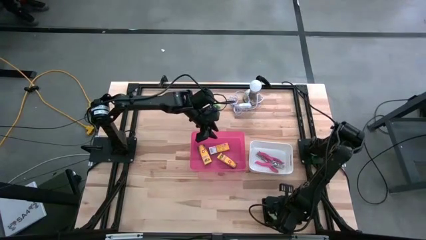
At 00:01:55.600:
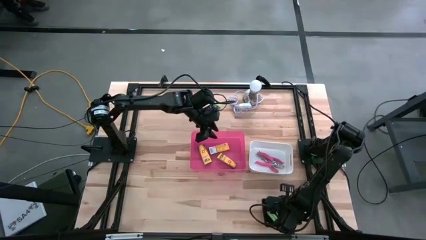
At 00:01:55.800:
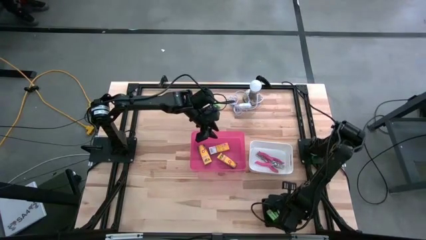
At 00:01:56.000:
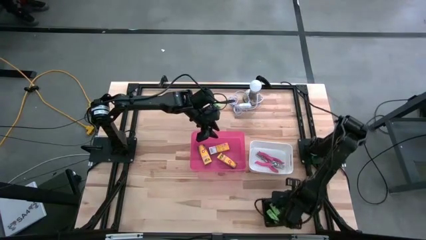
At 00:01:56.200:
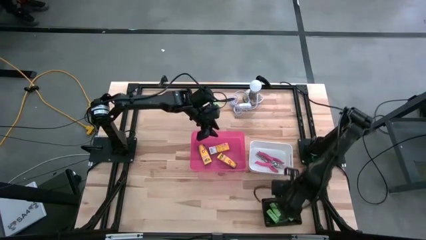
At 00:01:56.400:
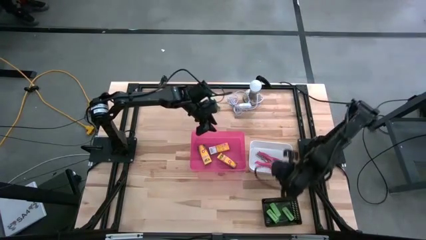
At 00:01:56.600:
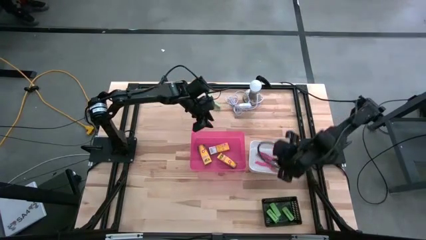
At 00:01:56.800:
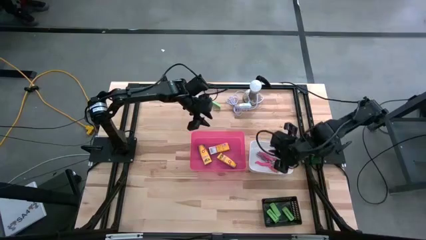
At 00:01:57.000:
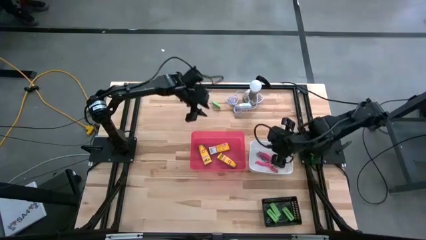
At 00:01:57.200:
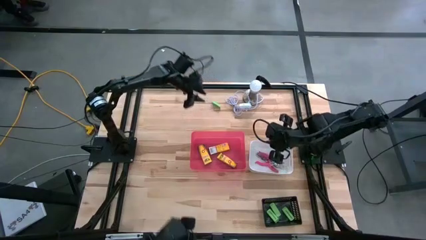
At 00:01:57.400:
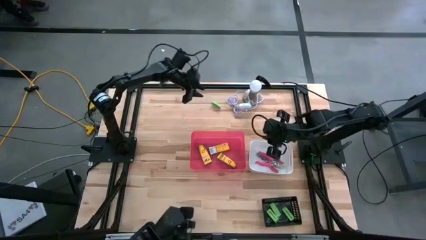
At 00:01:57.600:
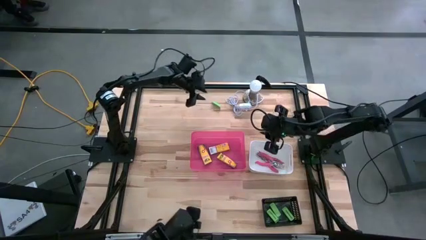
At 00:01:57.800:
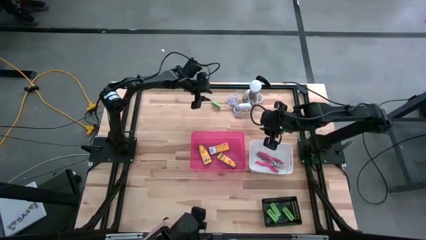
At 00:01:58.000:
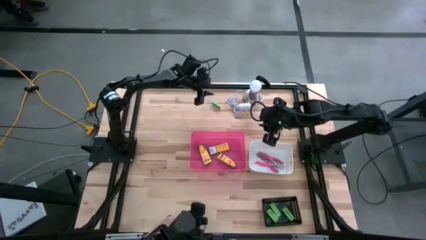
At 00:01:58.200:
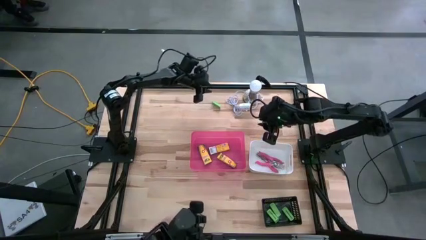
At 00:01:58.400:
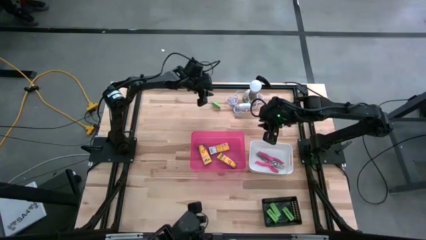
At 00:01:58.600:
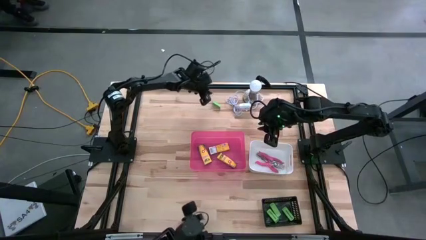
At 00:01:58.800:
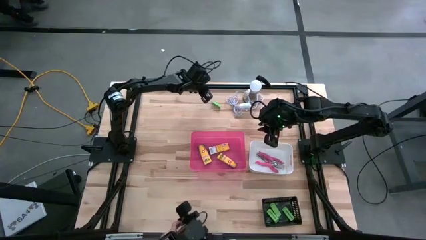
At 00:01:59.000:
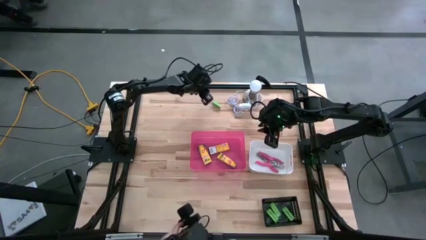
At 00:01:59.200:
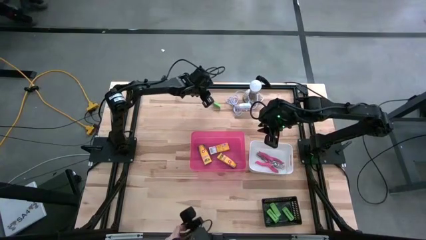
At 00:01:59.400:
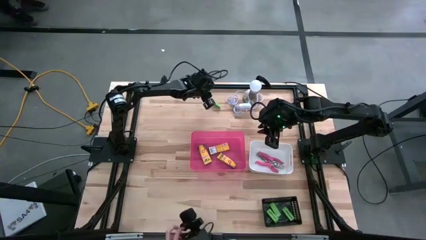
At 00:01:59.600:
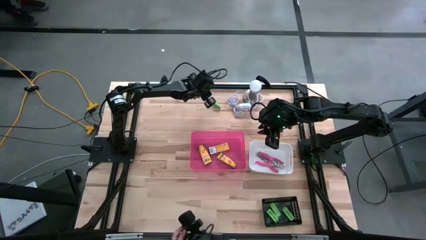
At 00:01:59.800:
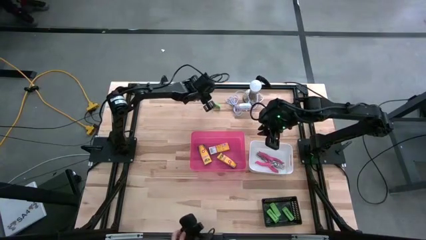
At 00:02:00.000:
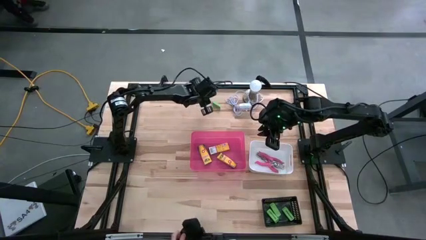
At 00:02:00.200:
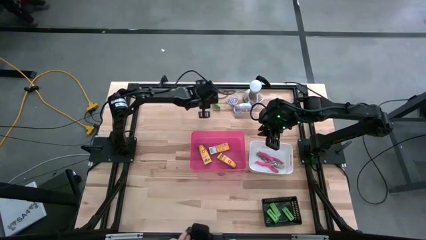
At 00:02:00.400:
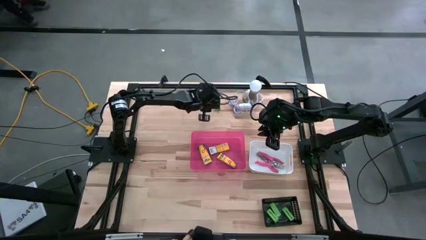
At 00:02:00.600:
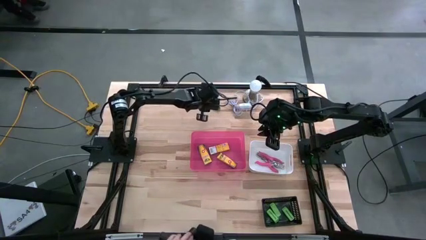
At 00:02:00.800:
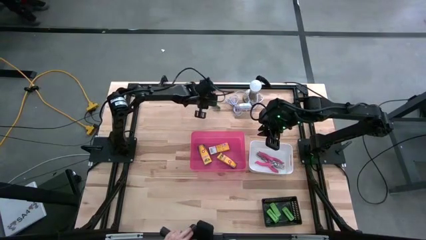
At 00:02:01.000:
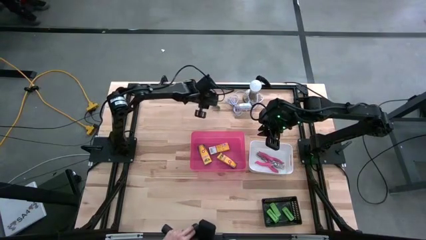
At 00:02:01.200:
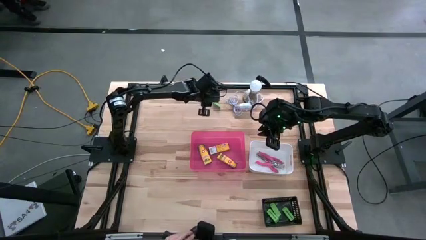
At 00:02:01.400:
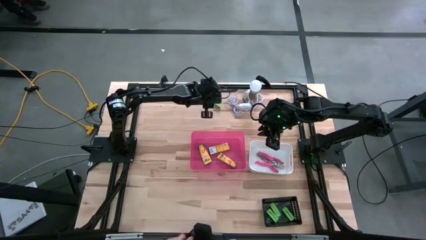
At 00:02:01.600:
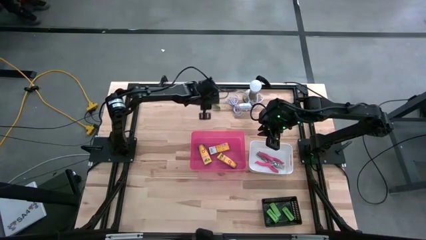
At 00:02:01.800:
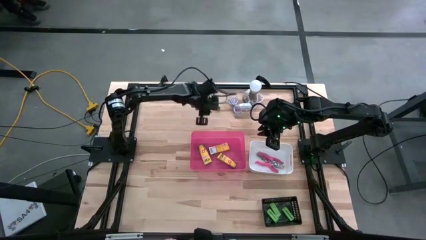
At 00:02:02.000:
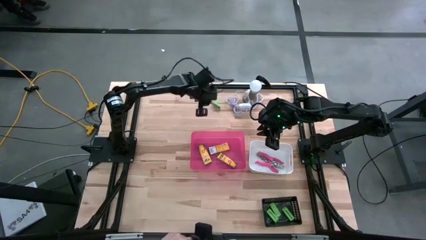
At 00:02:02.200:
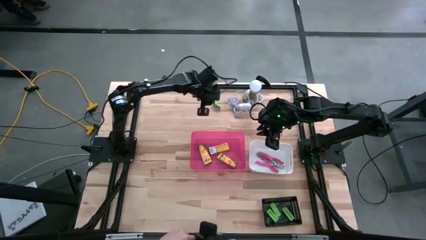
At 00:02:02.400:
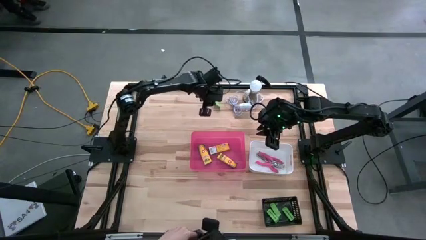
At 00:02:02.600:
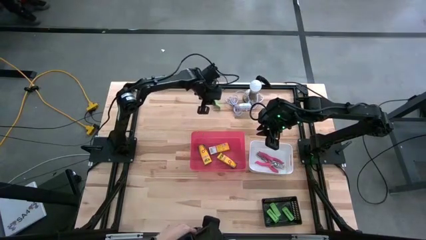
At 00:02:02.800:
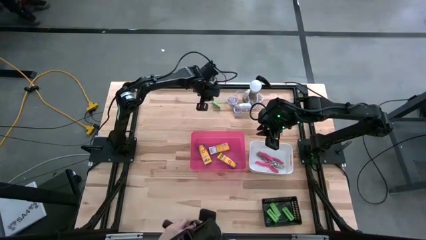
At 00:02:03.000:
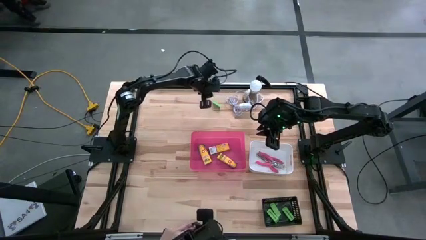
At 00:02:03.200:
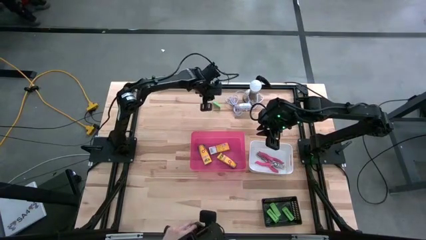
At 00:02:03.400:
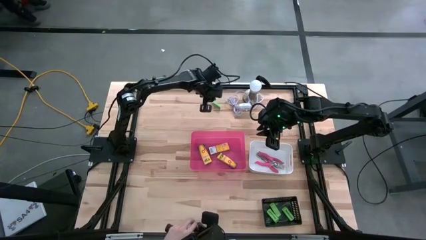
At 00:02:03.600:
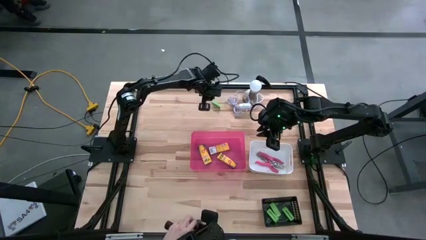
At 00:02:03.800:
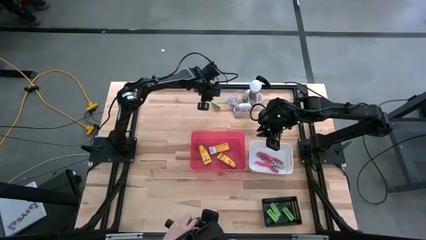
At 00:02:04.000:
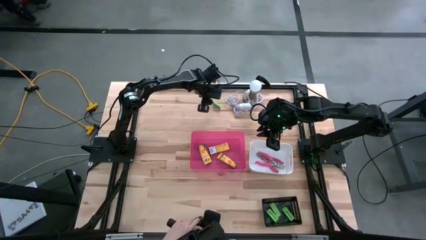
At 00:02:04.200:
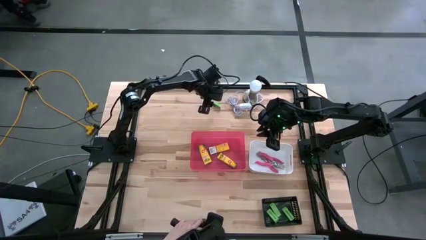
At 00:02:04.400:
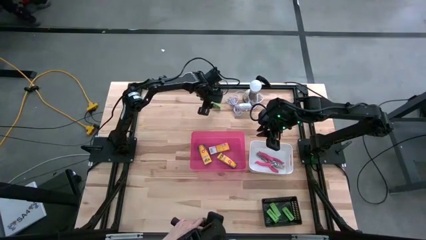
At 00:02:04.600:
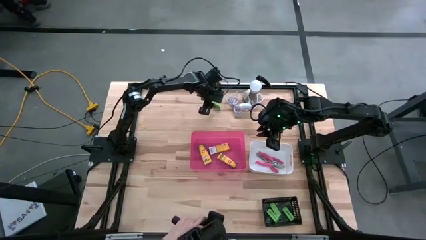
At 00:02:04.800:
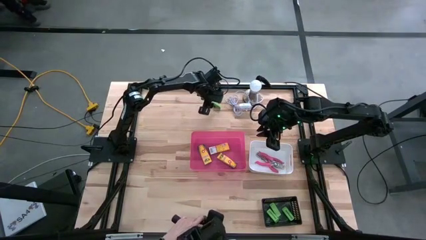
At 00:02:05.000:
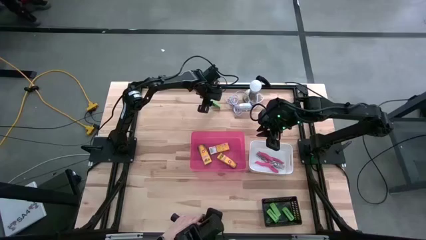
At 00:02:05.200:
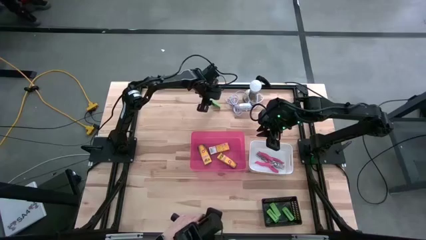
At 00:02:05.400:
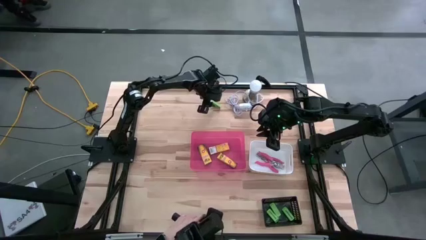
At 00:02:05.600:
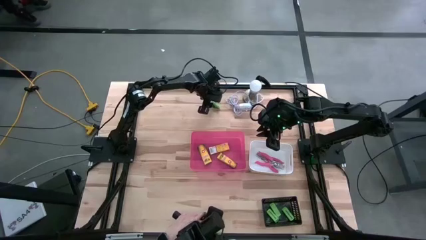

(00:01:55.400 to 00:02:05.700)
Task: Pick & Place School Supplies
Put the green eraser into the black bin

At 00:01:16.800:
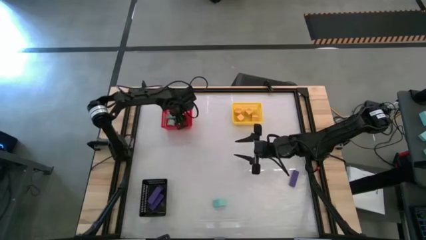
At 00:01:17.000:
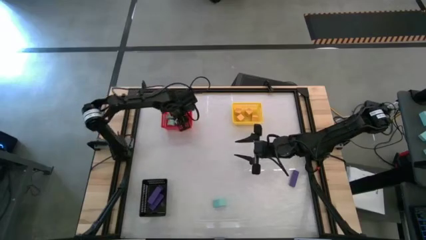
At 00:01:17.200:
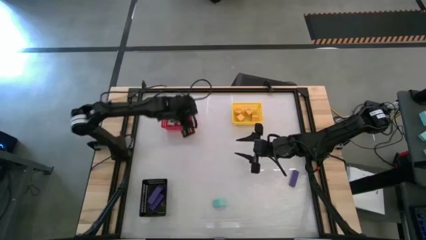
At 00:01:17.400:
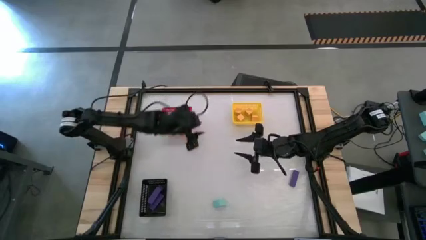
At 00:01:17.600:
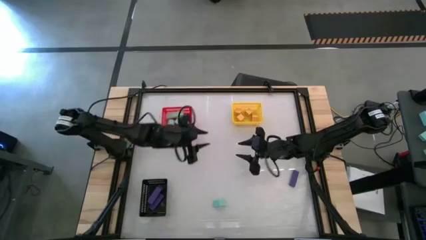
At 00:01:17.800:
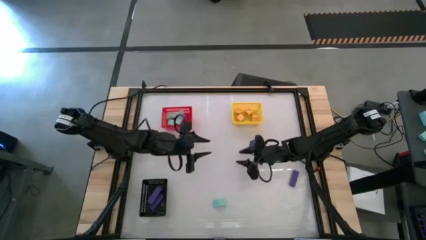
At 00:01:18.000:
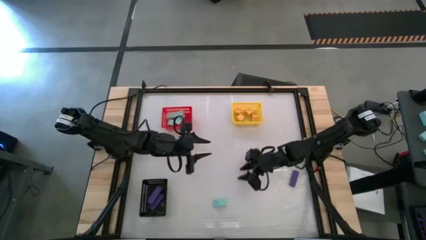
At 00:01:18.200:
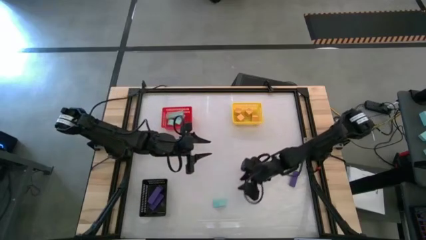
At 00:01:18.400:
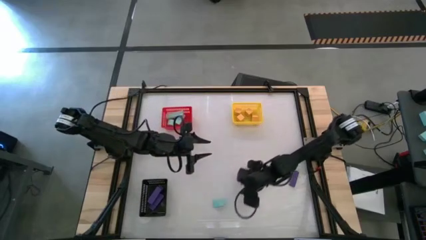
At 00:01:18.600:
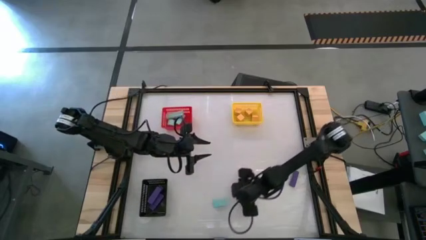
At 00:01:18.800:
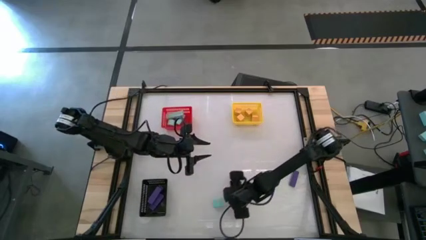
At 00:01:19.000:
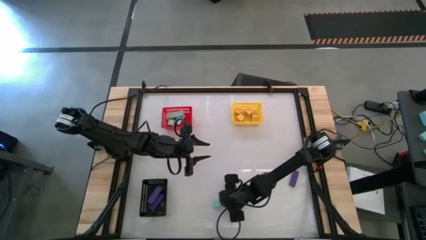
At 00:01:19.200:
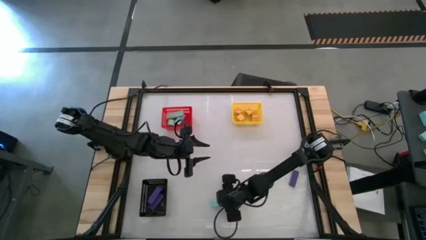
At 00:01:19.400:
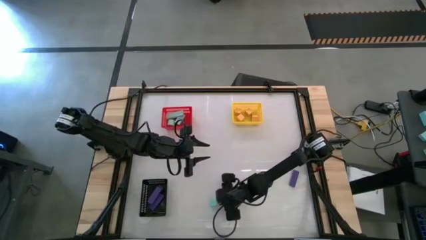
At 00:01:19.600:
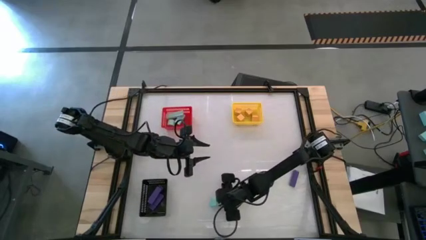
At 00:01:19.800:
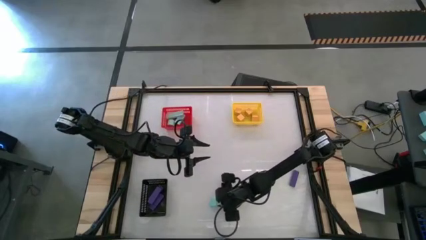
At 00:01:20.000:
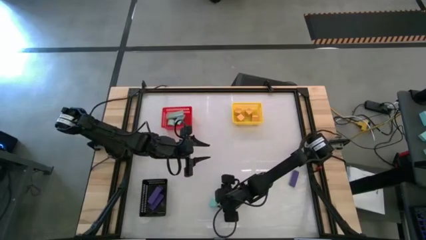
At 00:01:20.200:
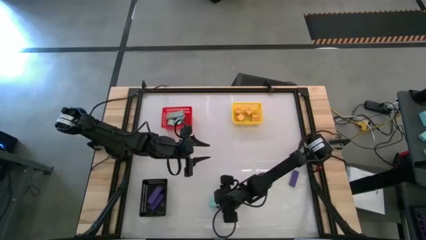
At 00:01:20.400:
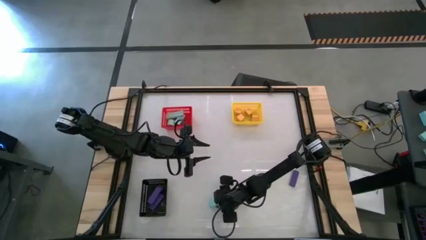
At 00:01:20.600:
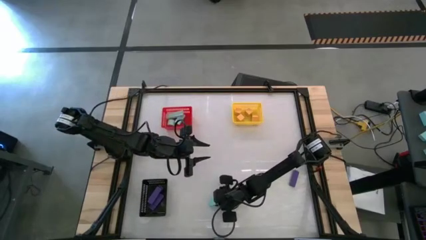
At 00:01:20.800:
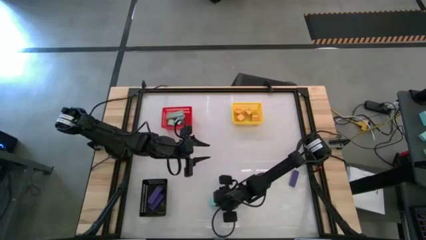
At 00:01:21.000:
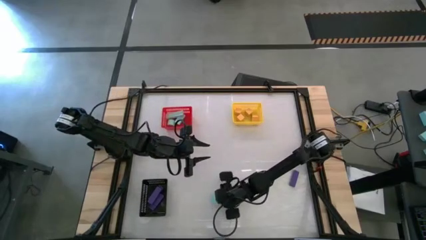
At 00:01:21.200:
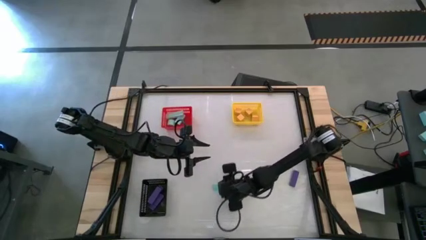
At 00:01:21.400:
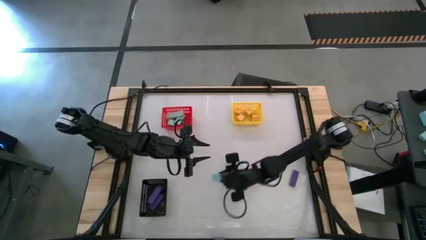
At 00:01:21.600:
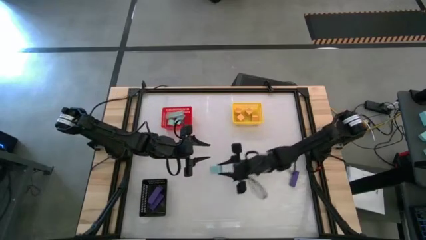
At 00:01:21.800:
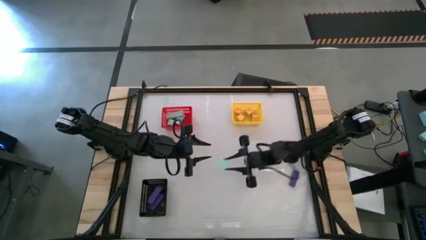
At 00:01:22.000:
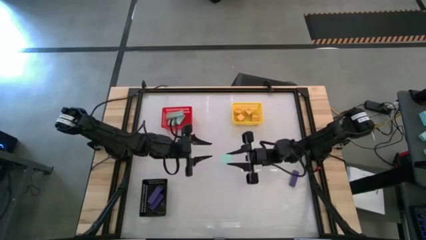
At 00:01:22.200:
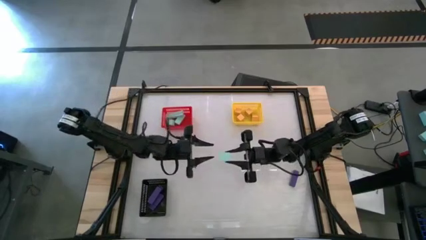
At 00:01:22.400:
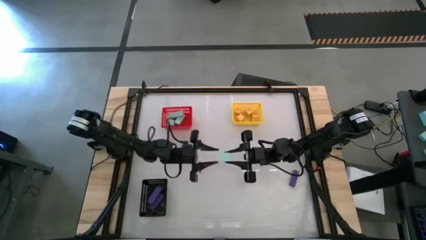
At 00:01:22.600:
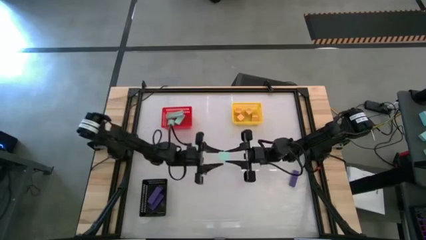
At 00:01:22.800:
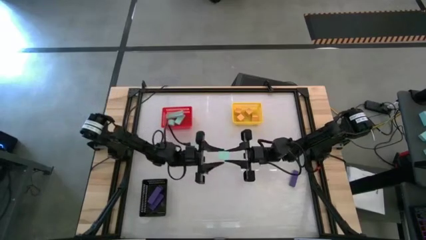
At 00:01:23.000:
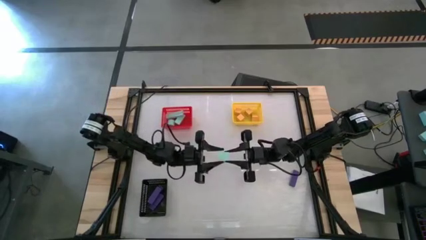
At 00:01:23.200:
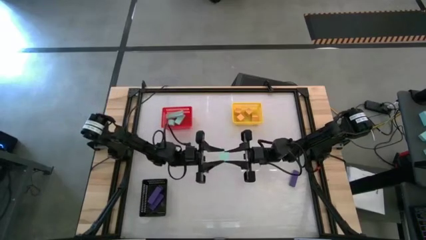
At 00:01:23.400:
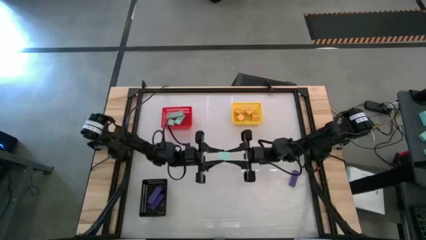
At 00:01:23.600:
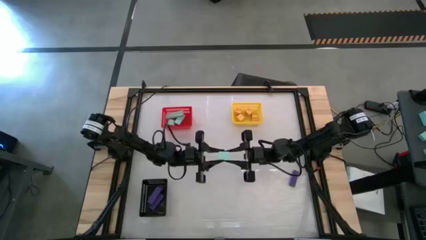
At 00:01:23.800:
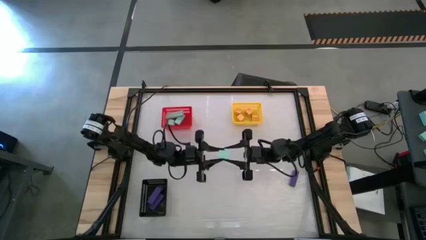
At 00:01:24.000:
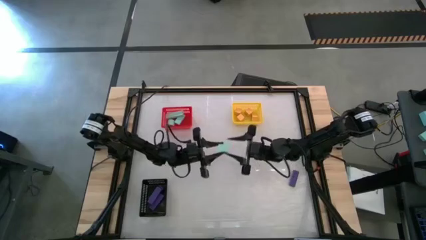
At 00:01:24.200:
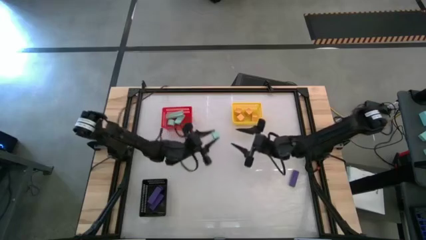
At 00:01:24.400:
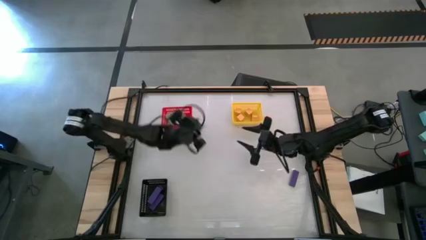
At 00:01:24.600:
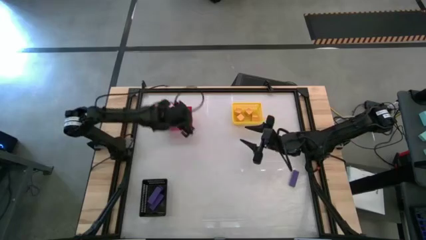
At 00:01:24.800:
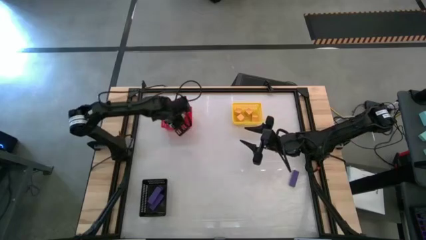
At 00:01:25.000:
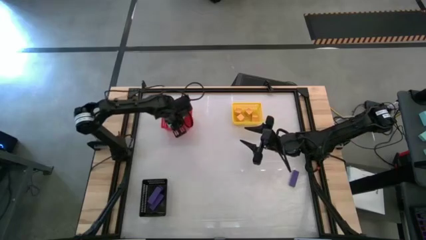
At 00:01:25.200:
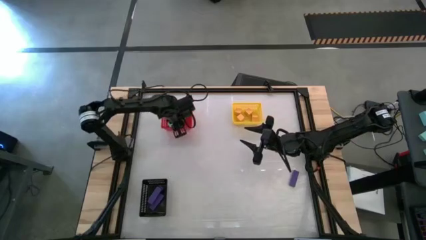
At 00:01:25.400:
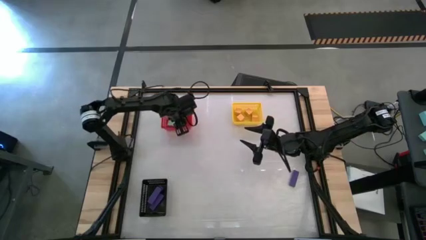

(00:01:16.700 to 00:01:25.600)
Task: Sort & place blocks by color
Put the light blue block into the red bin
